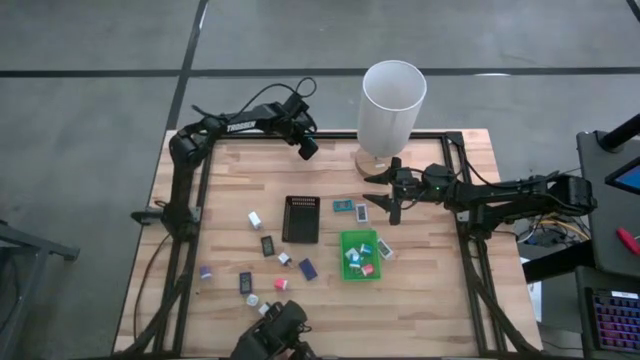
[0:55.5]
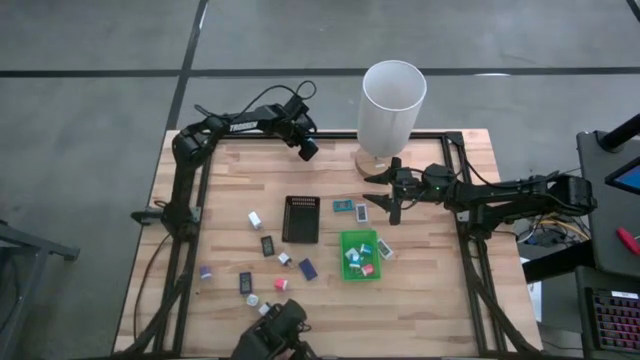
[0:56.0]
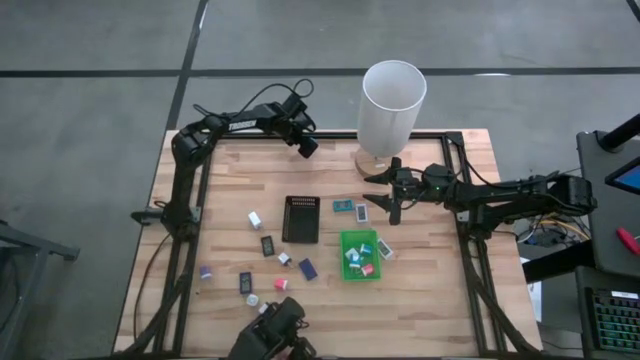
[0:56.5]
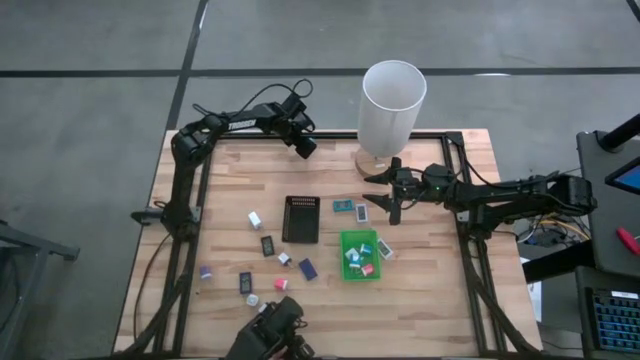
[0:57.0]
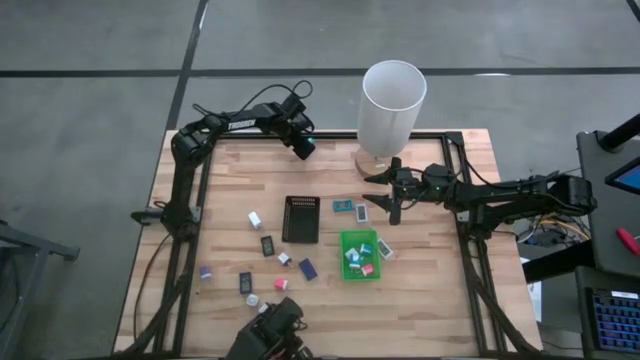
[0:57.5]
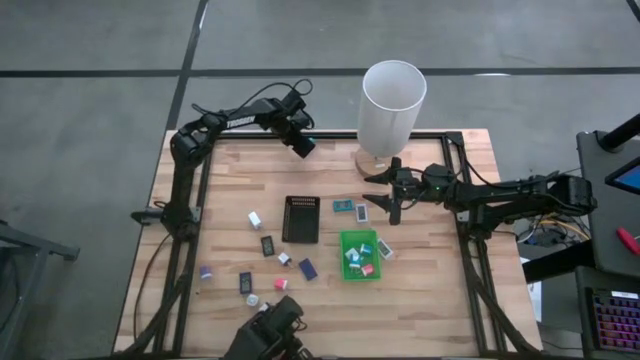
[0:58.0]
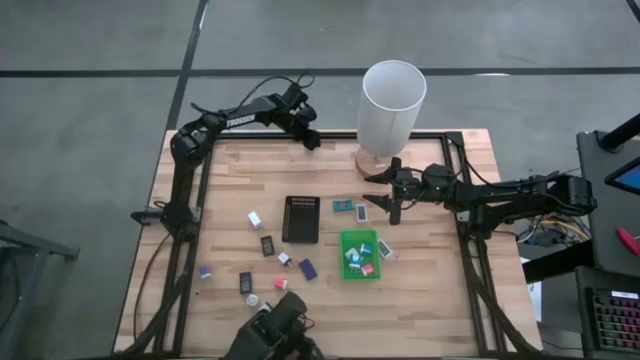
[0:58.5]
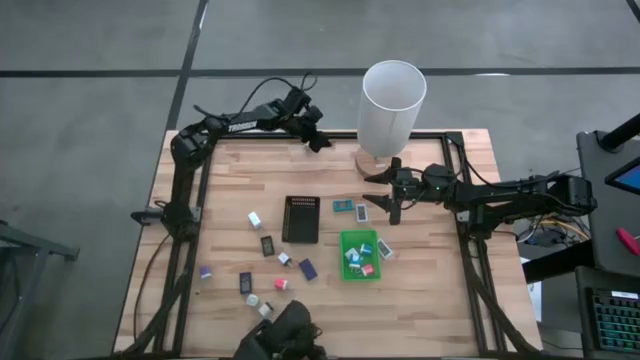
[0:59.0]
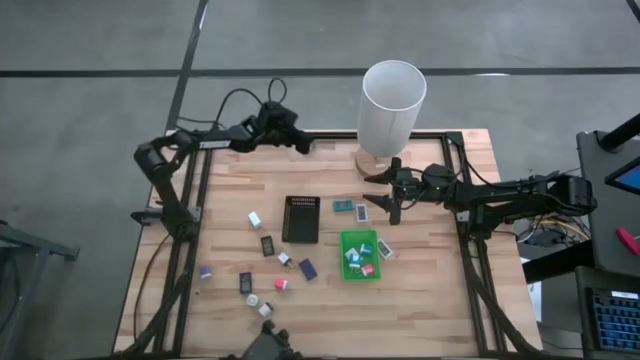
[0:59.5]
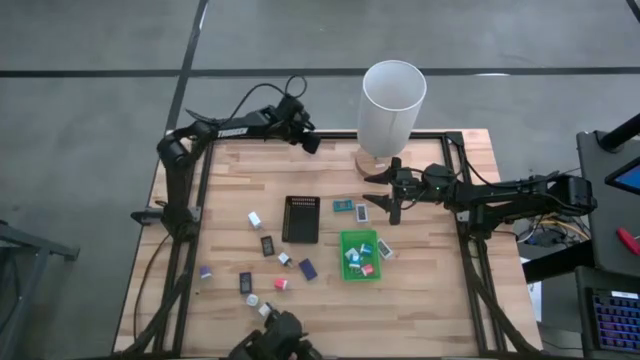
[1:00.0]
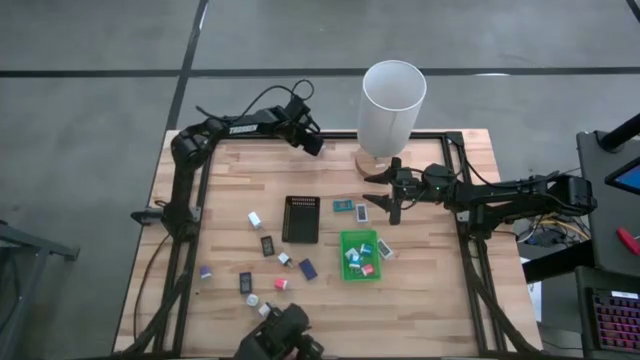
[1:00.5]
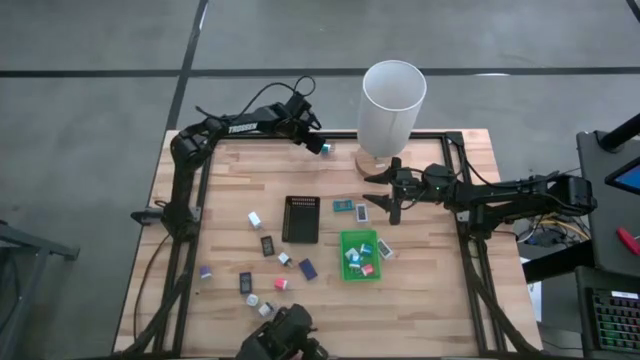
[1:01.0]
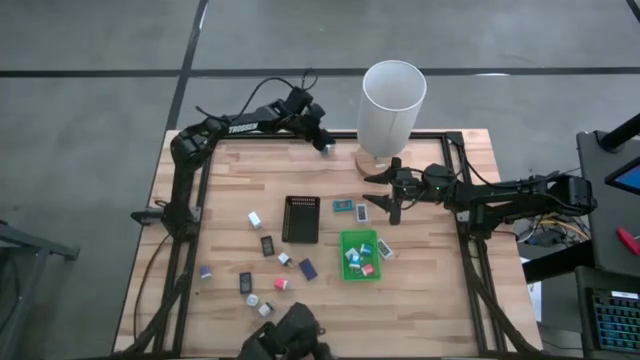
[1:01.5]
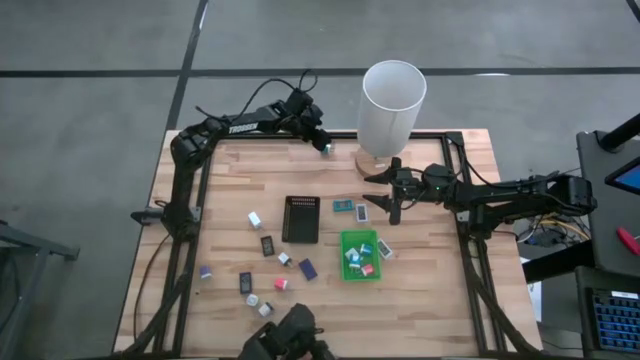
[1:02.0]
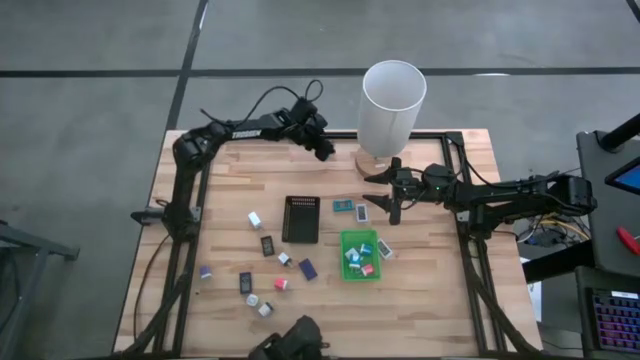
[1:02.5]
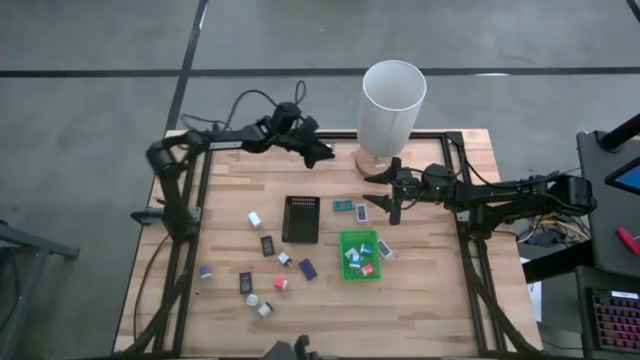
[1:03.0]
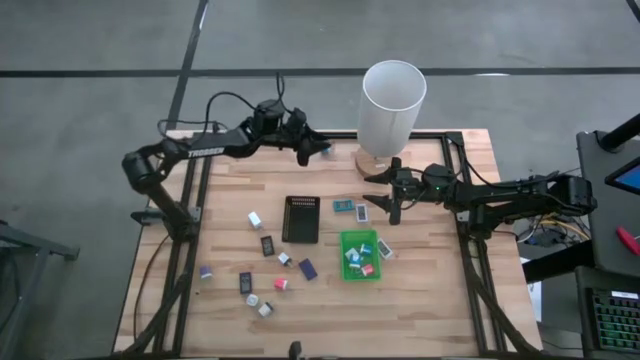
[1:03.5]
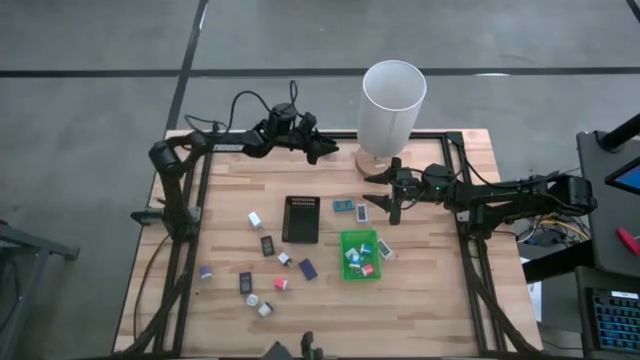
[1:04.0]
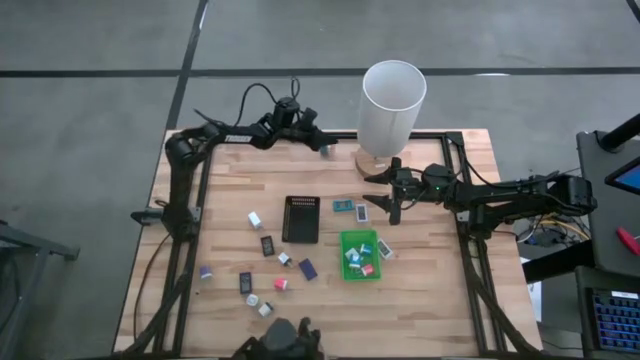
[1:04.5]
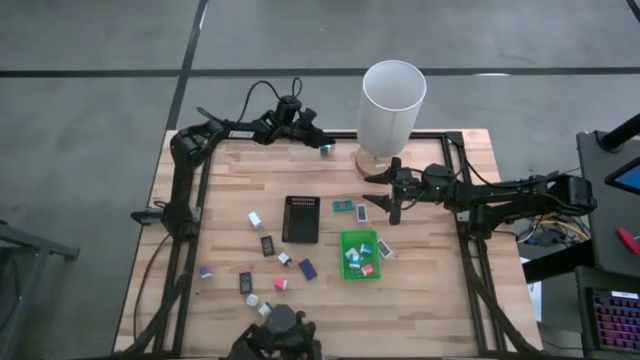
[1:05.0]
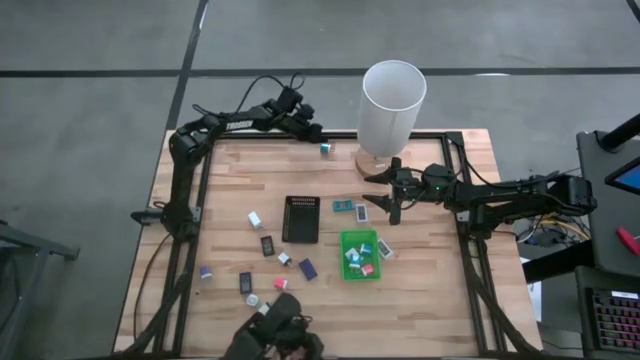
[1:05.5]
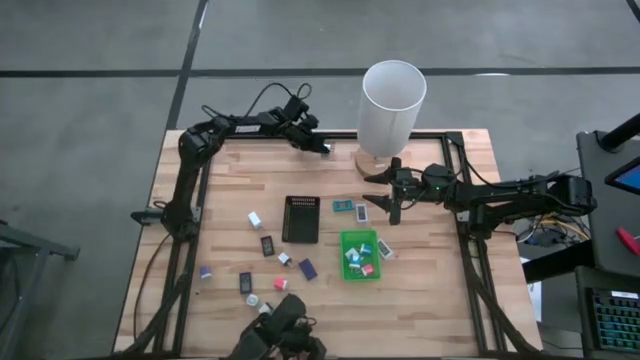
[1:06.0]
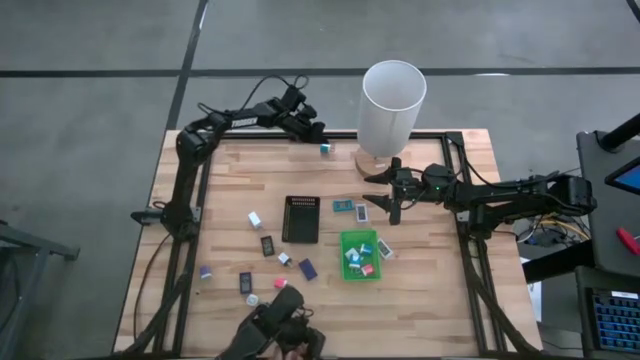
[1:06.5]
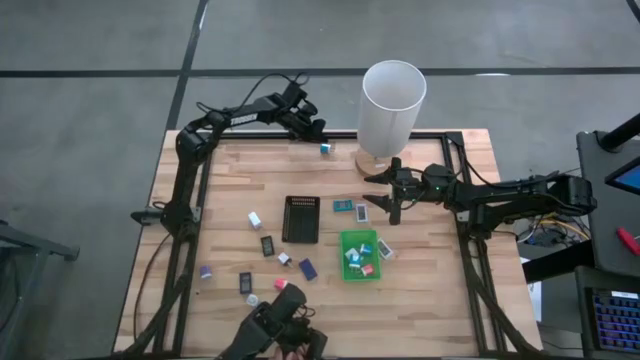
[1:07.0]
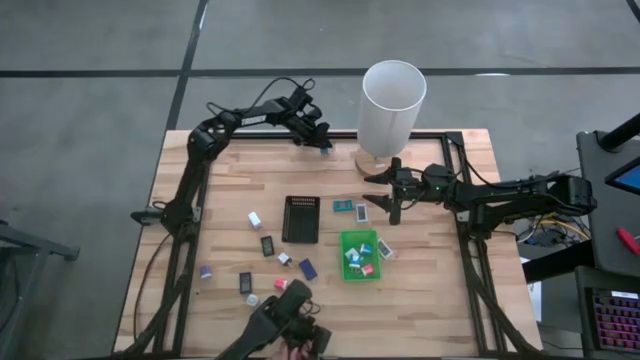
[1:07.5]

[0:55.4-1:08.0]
Task: Pick & Place Office items
Put the blue charger adapter into the green bin

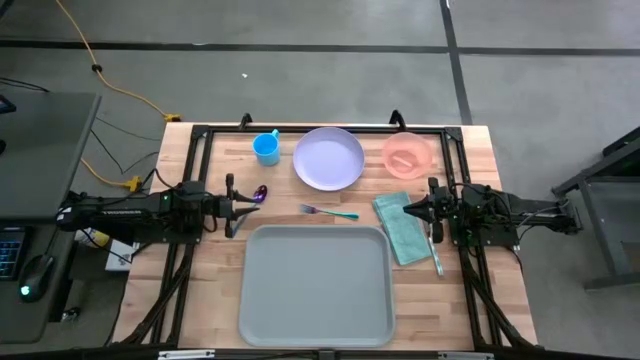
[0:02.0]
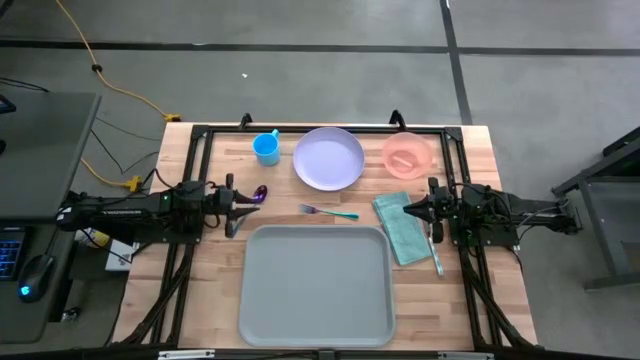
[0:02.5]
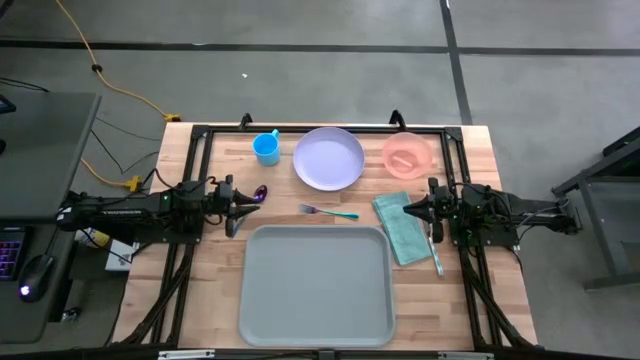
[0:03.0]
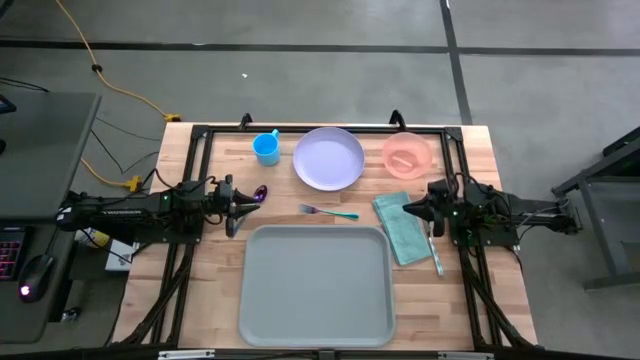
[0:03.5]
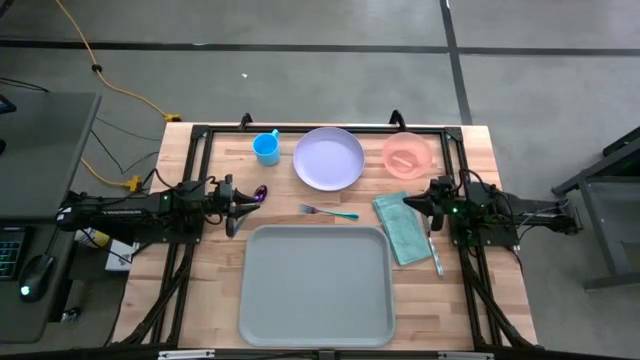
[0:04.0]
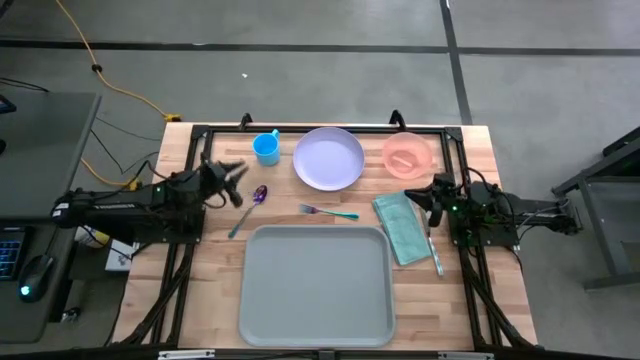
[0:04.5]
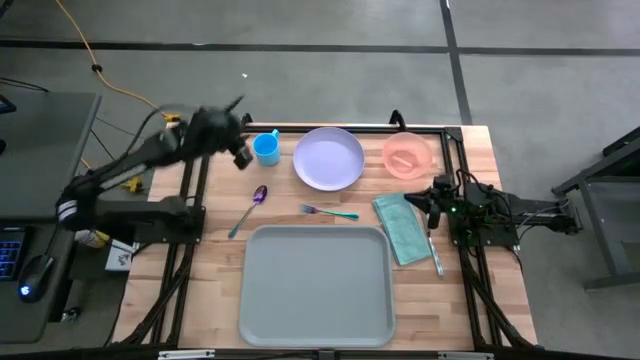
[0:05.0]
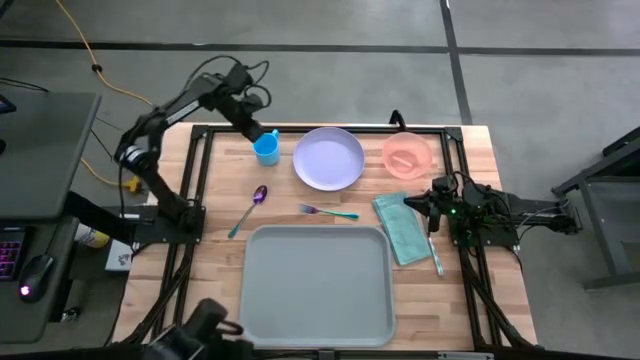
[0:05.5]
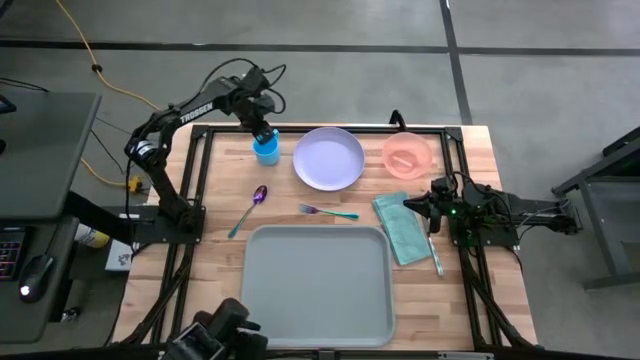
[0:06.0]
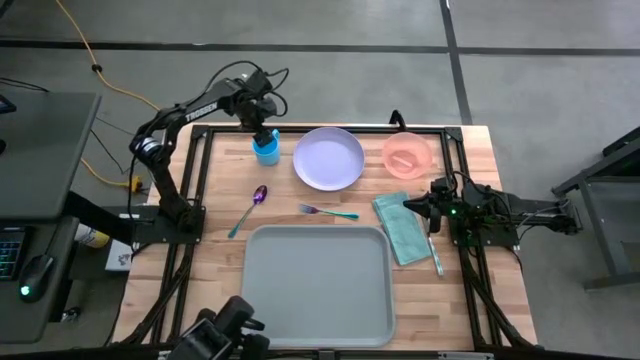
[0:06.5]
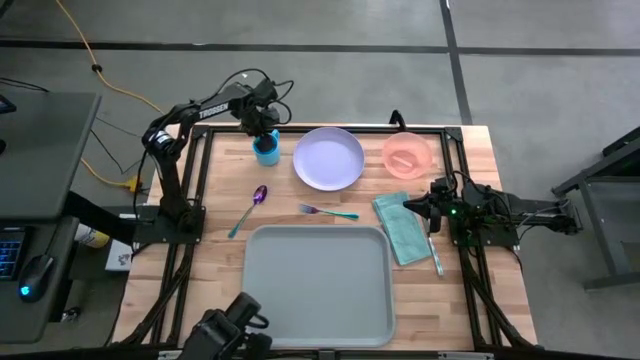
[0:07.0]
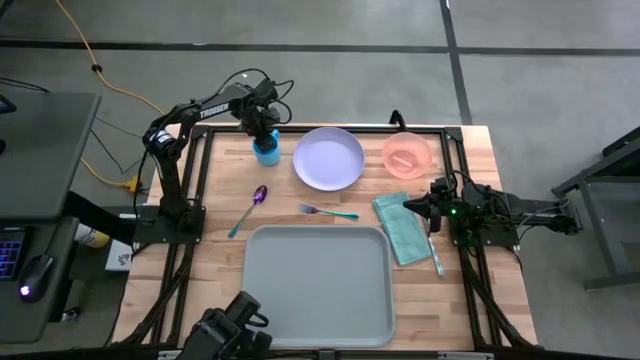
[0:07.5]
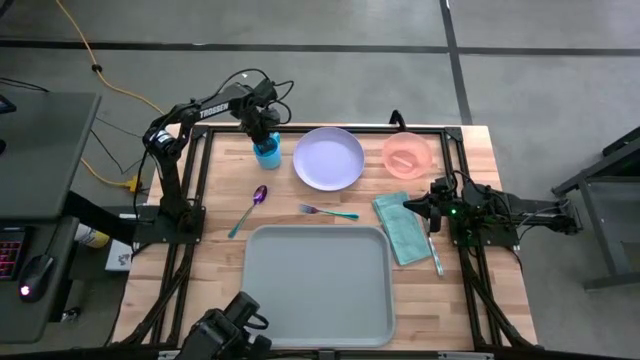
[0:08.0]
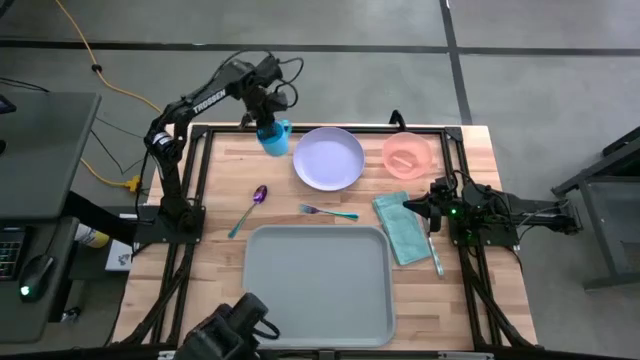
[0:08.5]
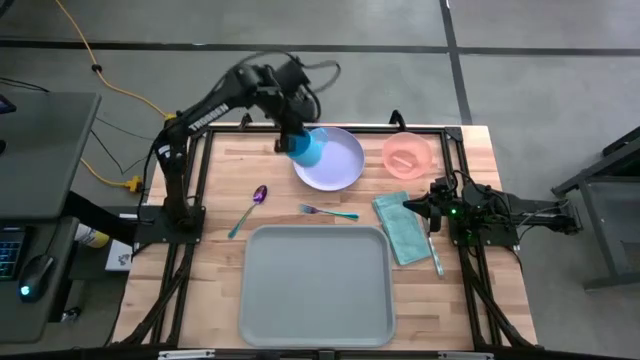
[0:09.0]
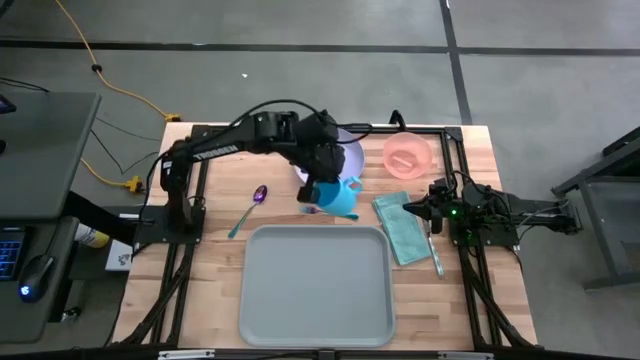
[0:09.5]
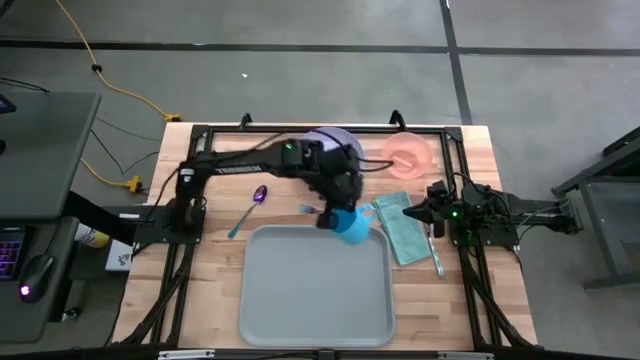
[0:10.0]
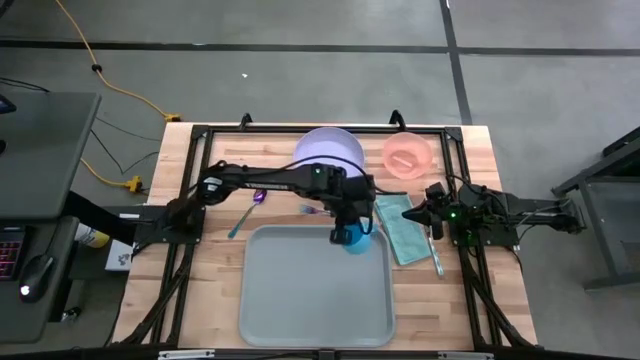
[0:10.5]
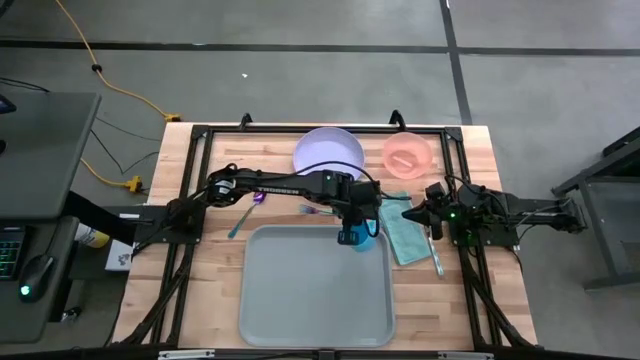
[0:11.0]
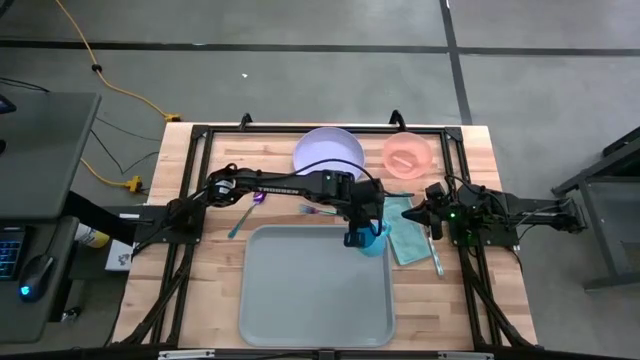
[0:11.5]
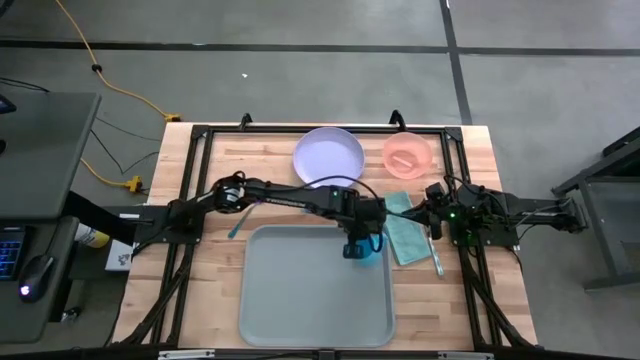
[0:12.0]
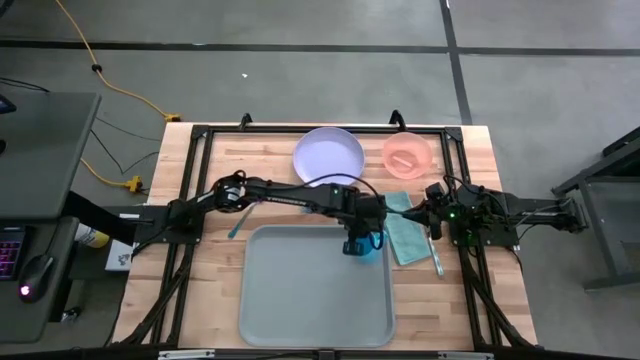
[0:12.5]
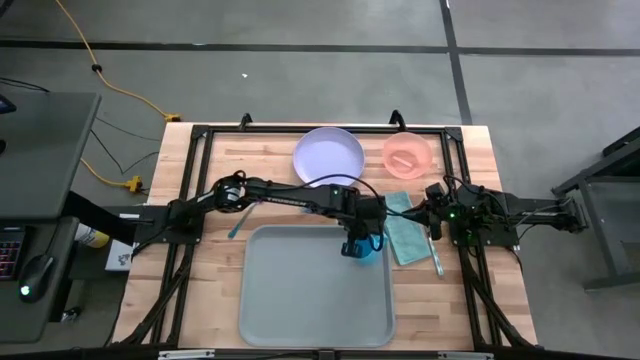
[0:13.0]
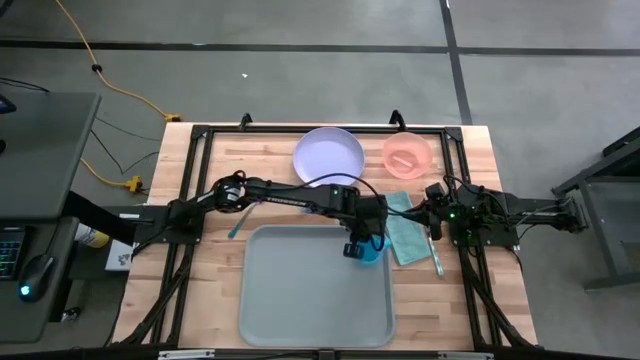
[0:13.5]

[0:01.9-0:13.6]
Task: Set up tray
Put the blue mug on the gray serving tray
